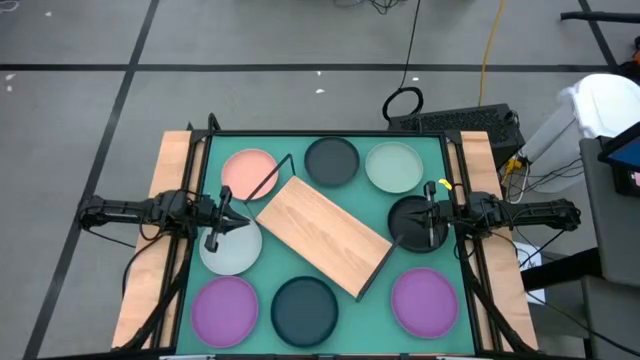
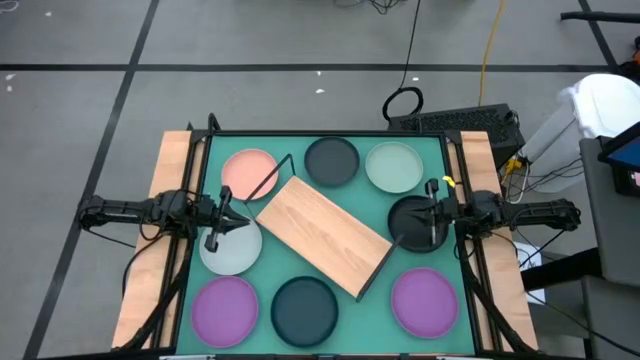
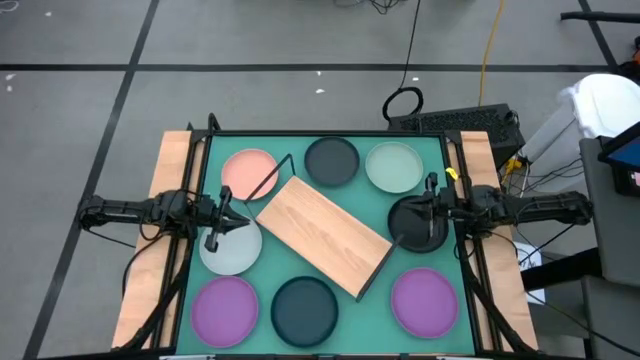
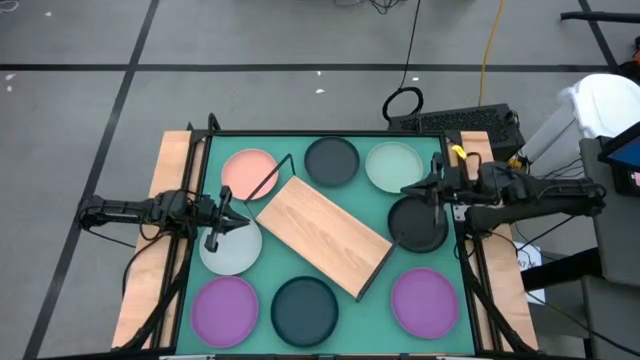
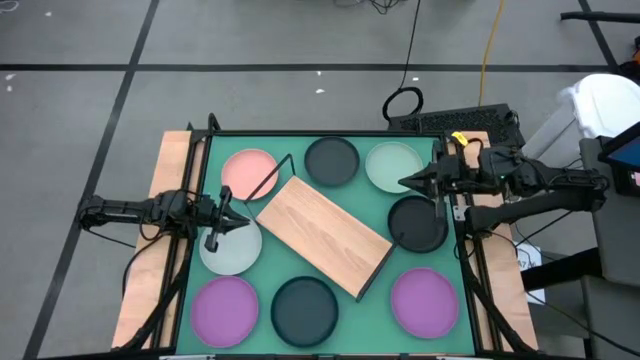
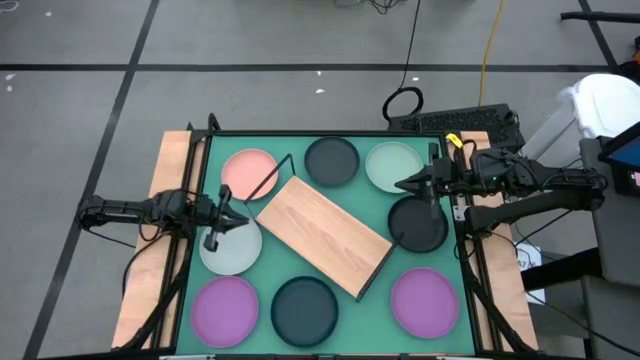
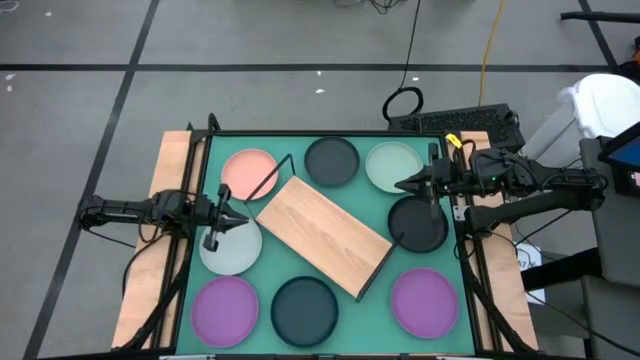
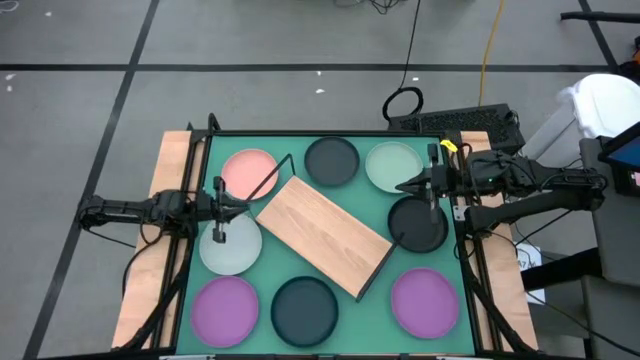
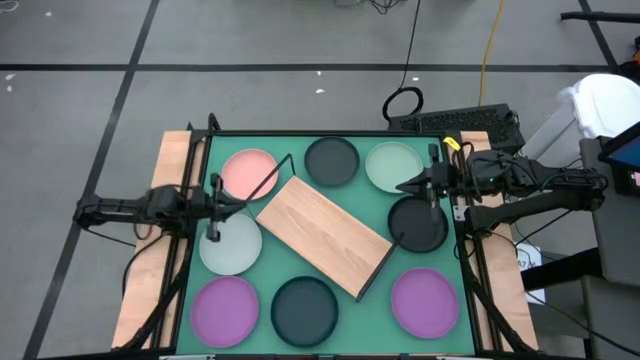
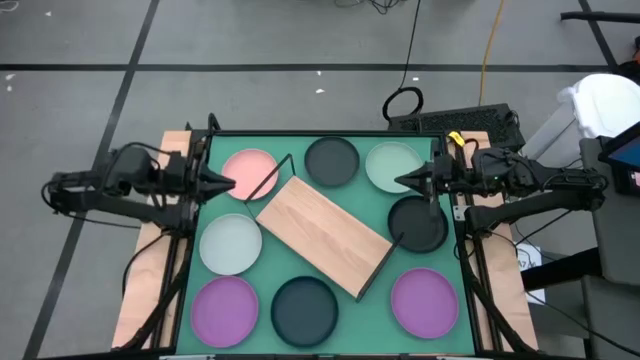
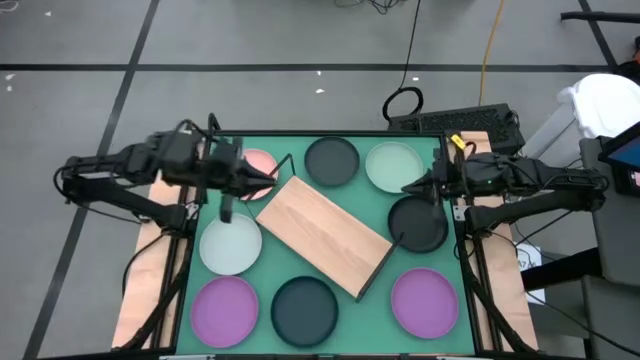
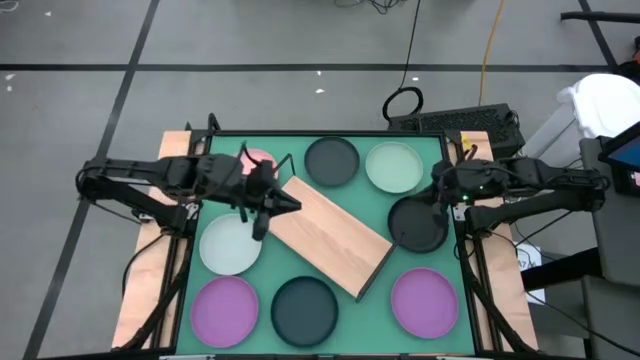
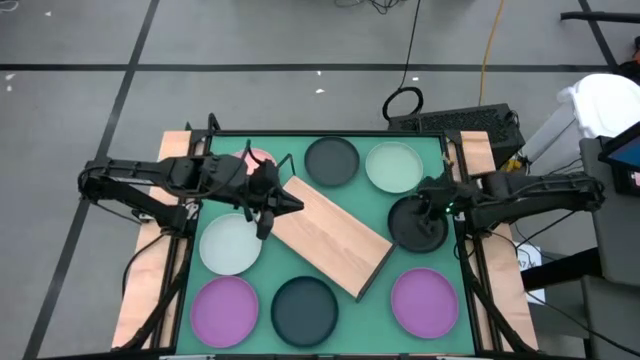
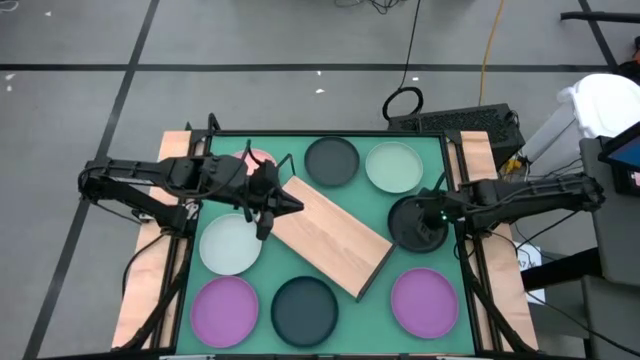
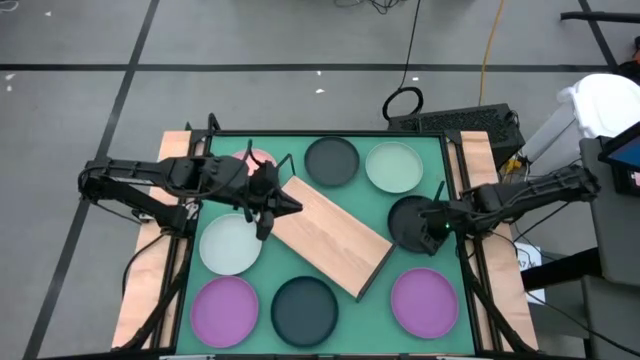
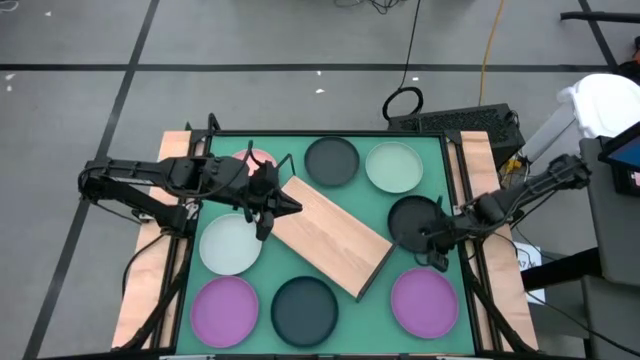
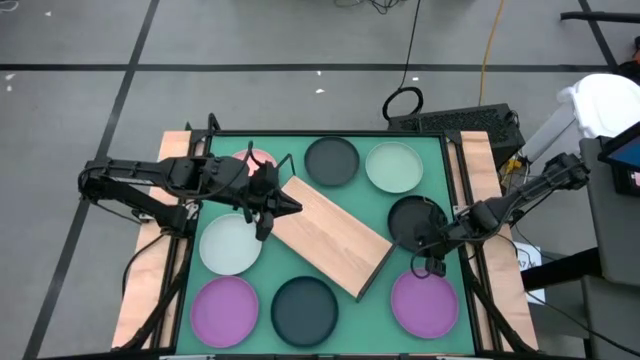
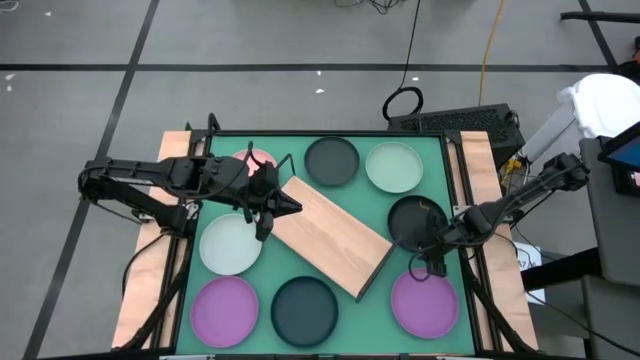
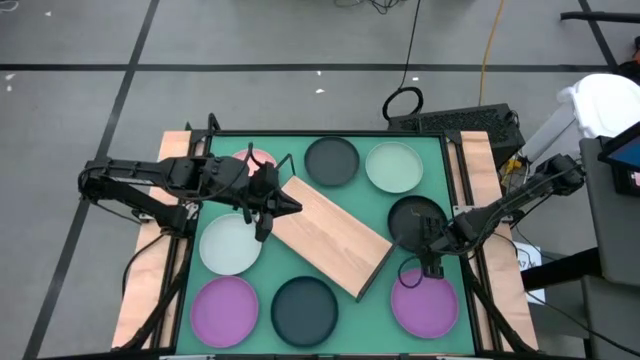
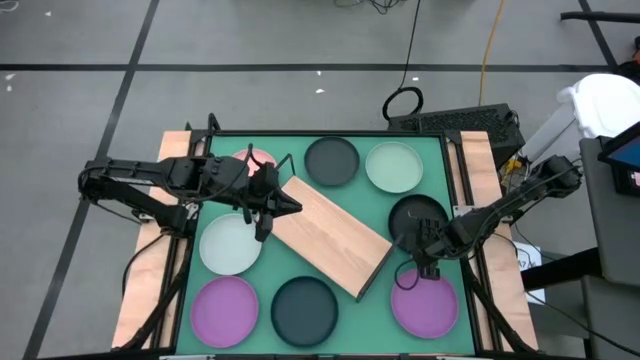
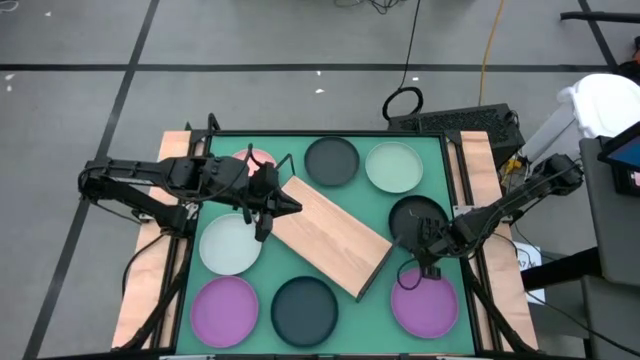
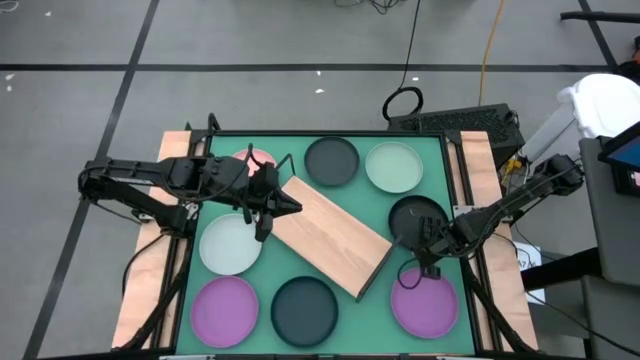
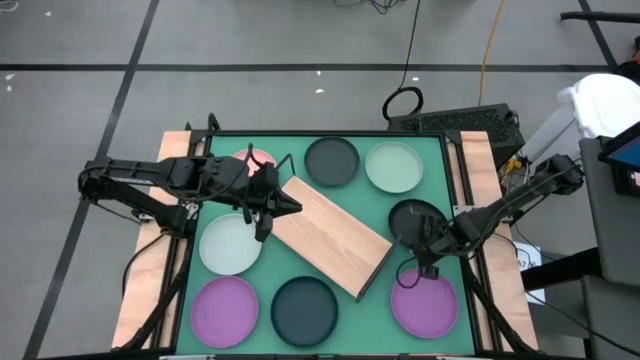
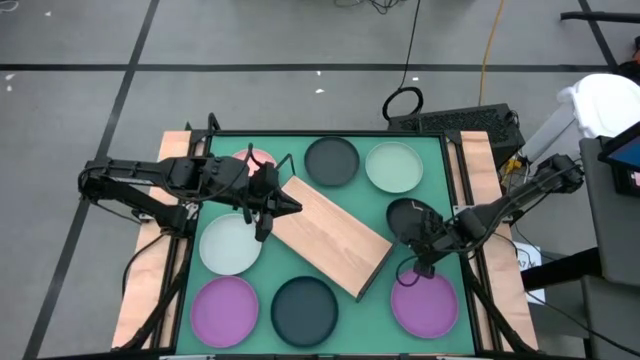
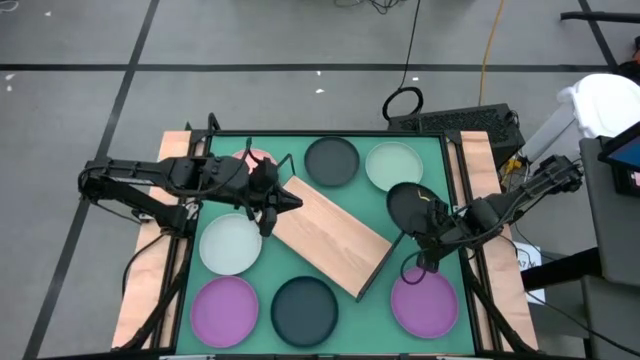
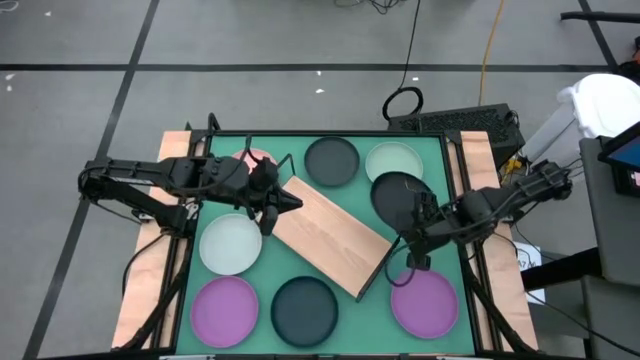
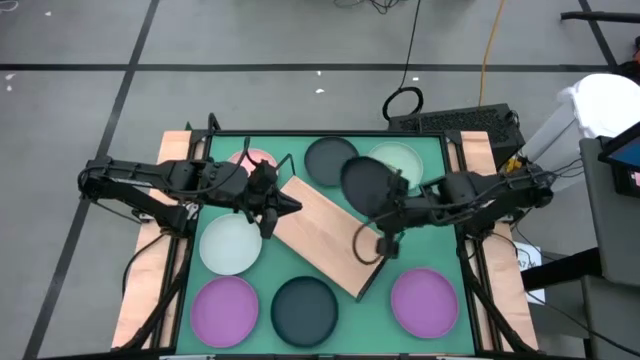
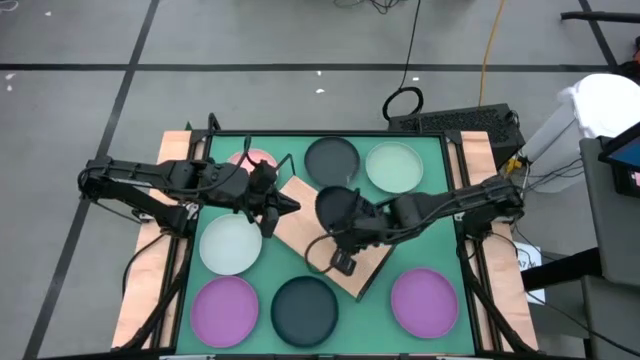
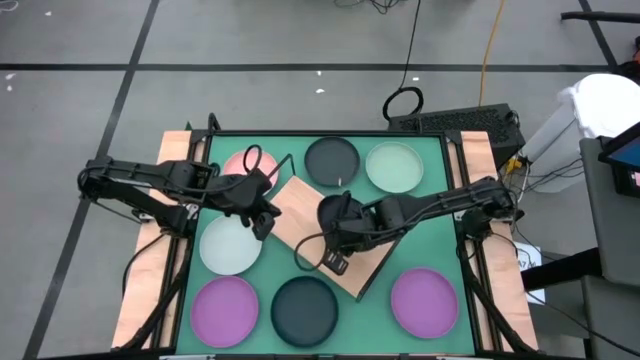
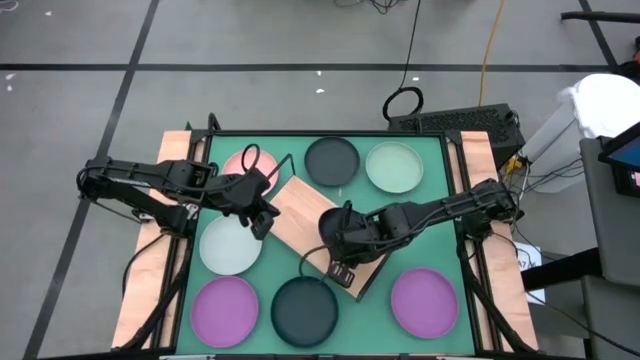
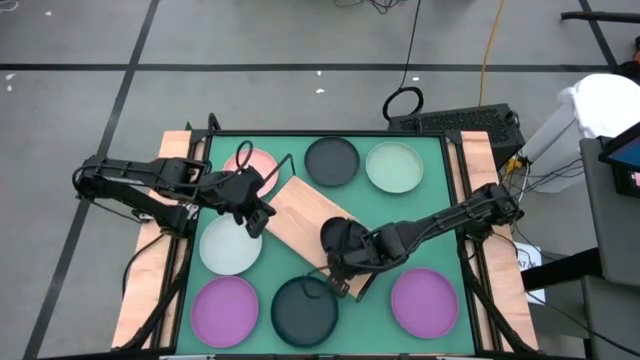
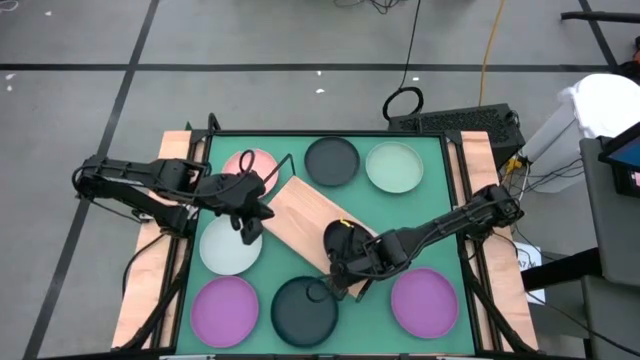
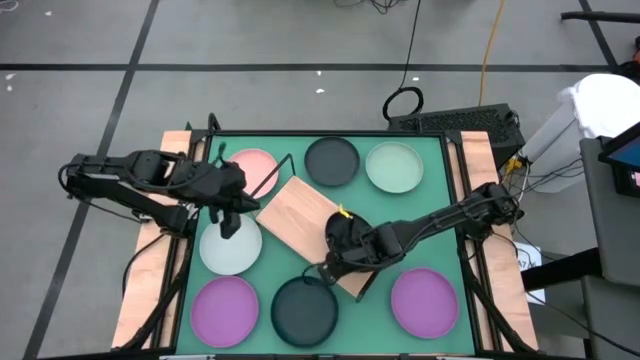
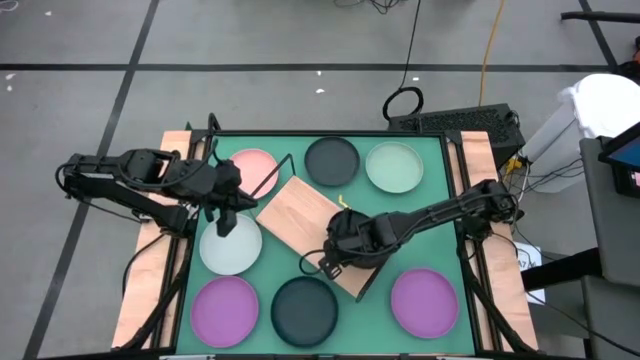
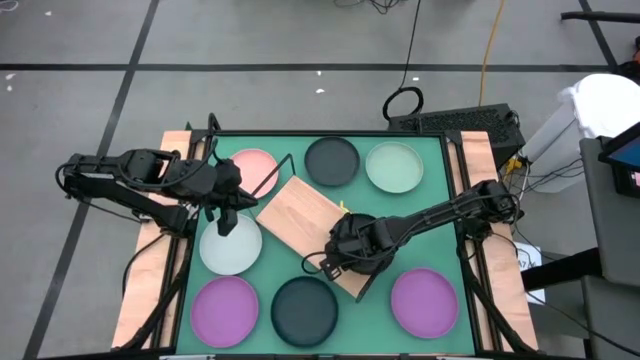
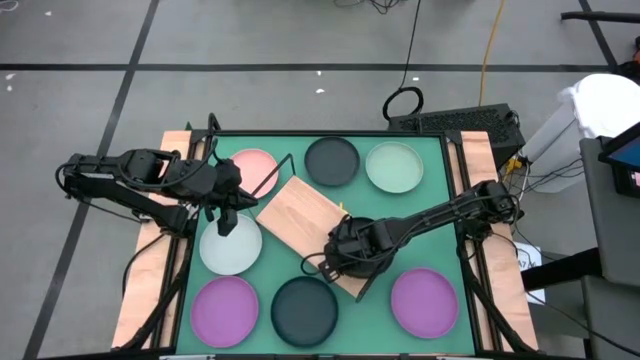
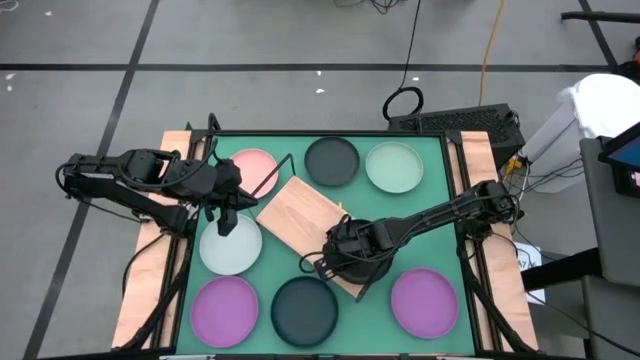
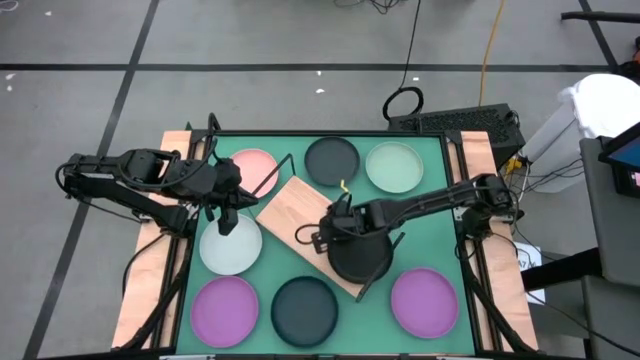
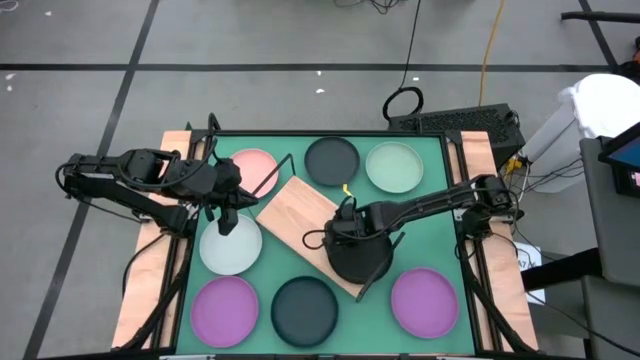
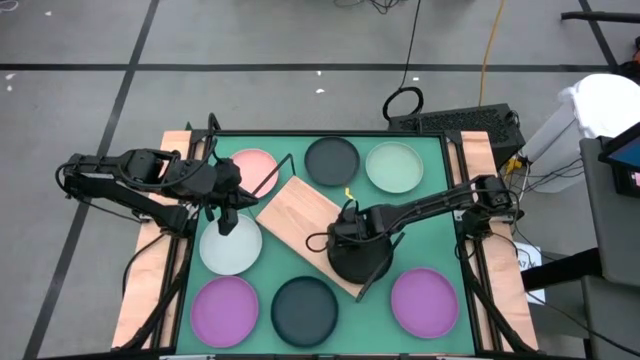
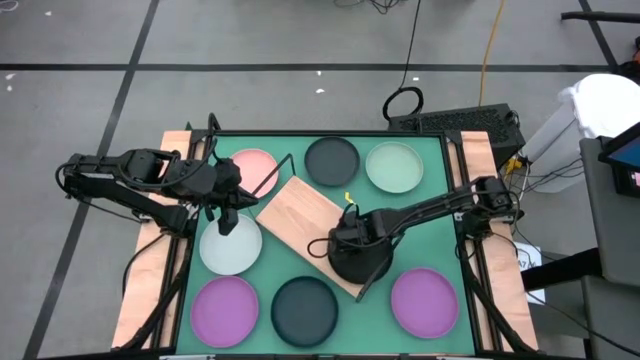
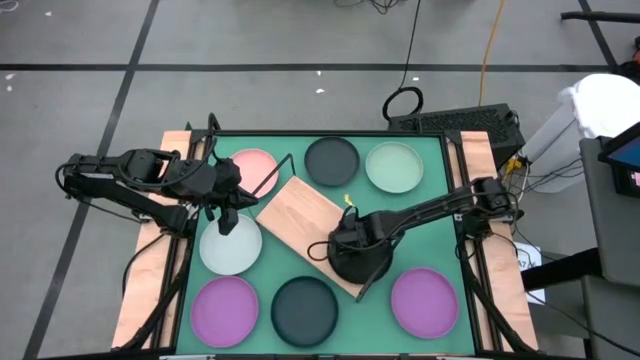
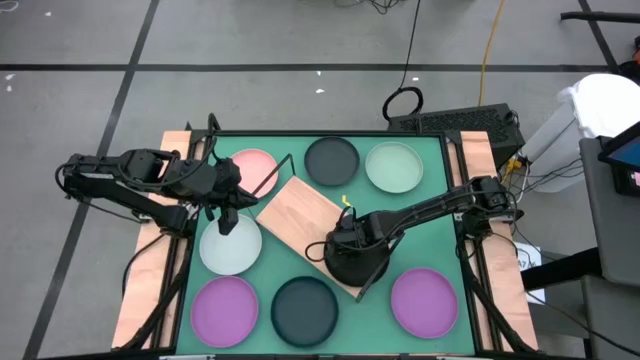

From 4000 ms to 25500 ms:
Task: Place and stack plates onto a shelf
Put the black plate on the shelf
